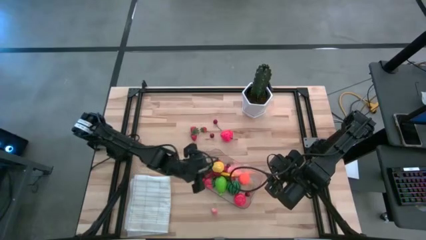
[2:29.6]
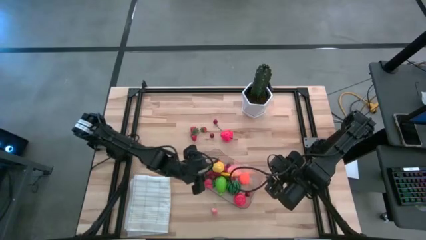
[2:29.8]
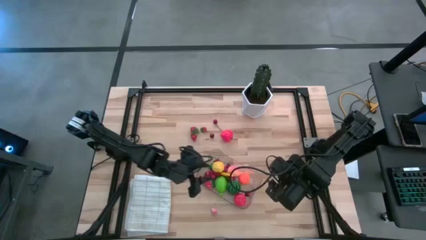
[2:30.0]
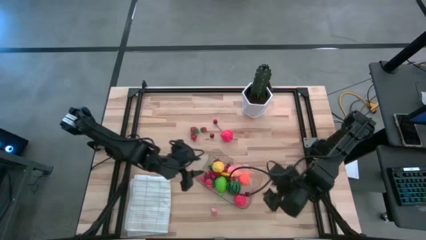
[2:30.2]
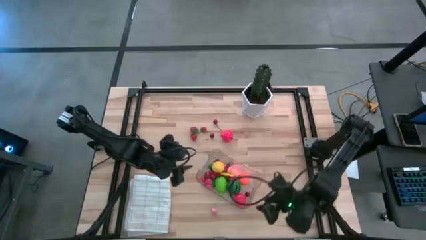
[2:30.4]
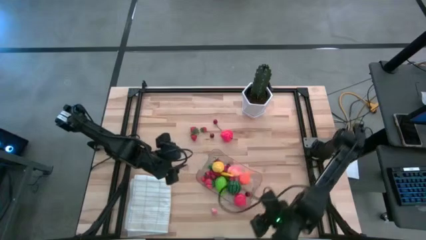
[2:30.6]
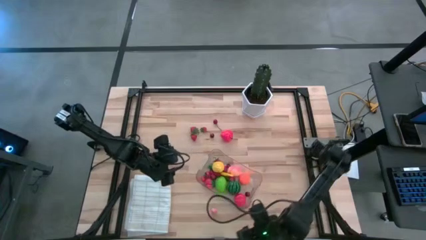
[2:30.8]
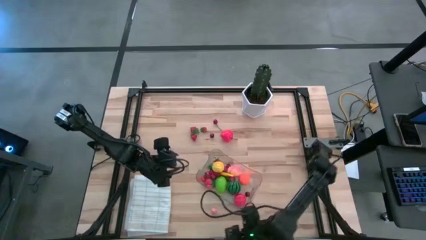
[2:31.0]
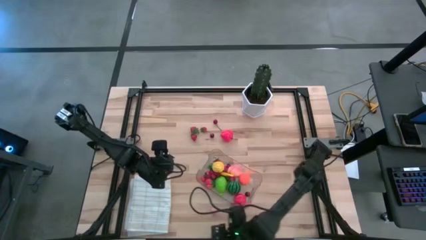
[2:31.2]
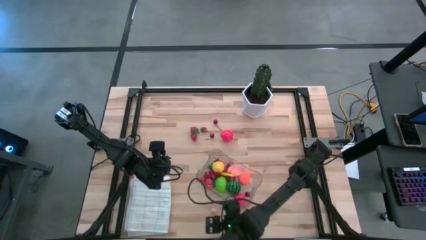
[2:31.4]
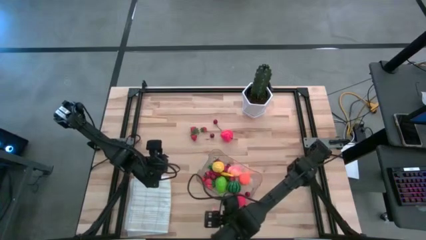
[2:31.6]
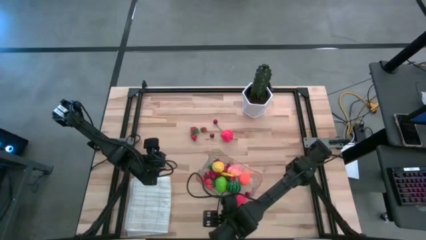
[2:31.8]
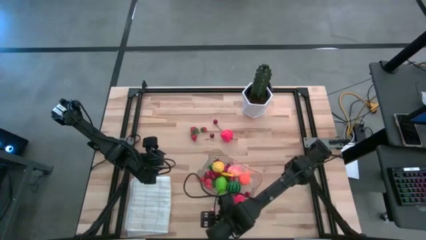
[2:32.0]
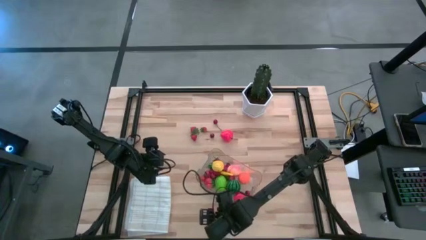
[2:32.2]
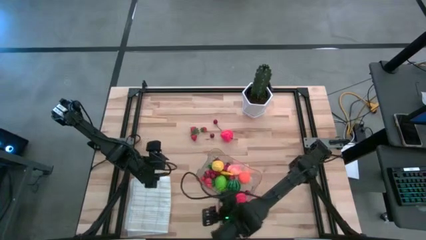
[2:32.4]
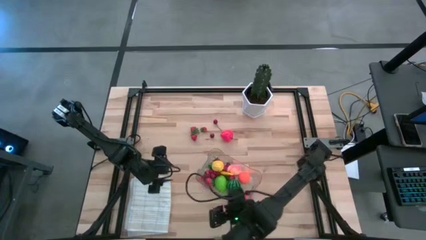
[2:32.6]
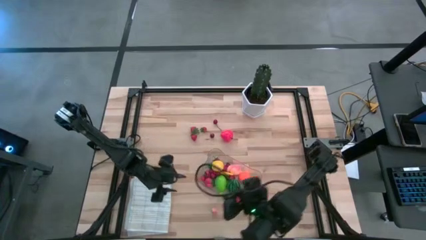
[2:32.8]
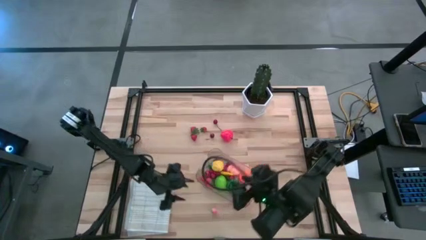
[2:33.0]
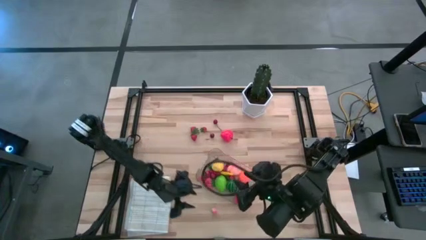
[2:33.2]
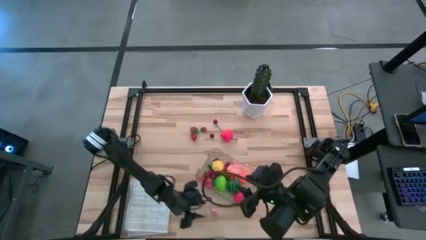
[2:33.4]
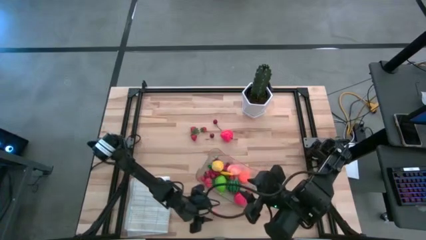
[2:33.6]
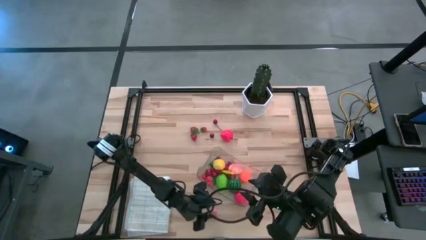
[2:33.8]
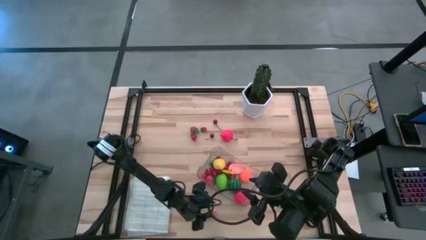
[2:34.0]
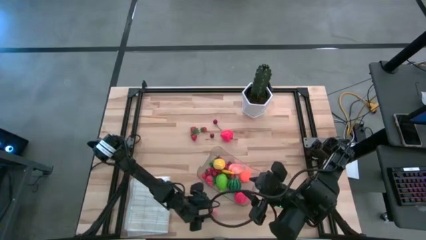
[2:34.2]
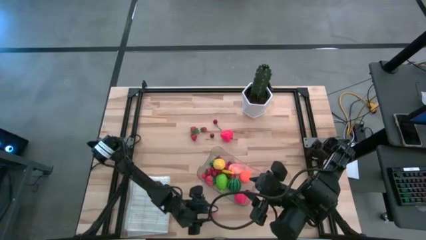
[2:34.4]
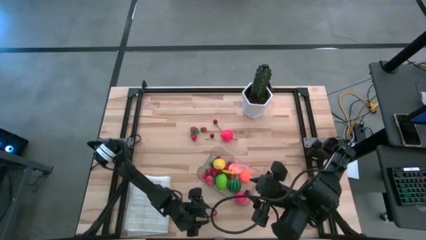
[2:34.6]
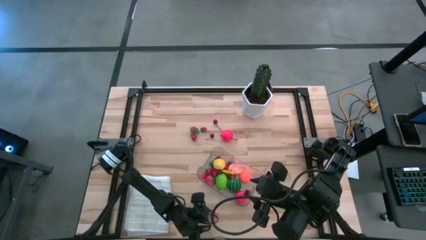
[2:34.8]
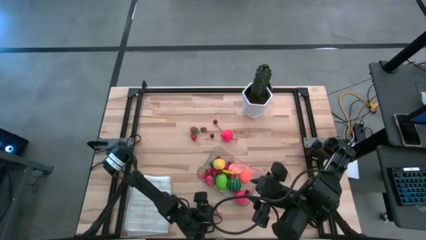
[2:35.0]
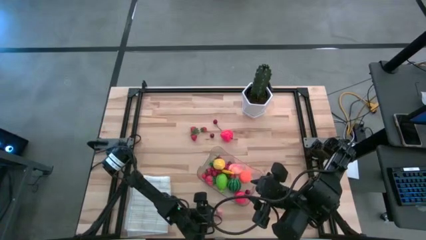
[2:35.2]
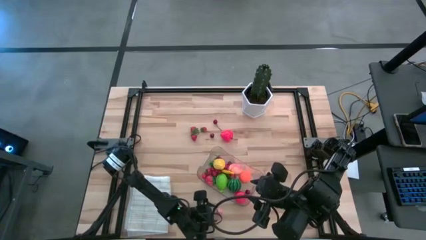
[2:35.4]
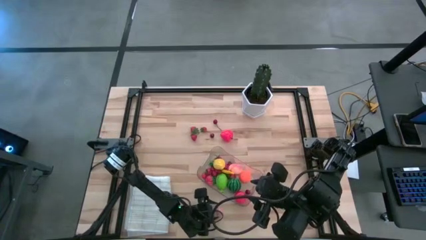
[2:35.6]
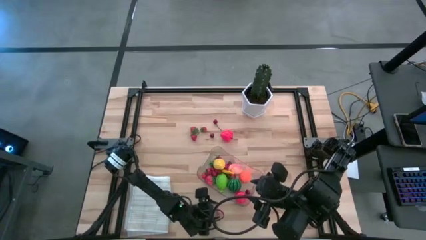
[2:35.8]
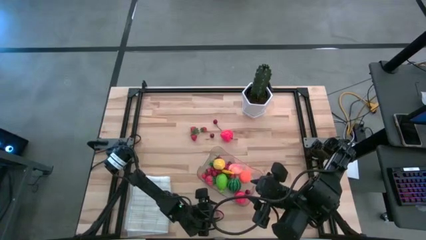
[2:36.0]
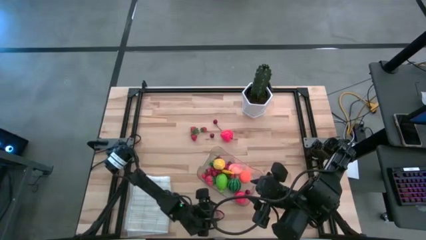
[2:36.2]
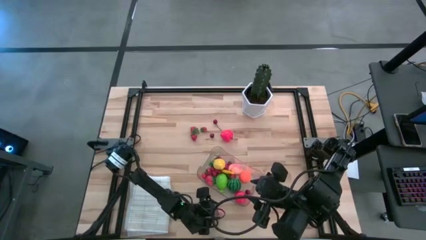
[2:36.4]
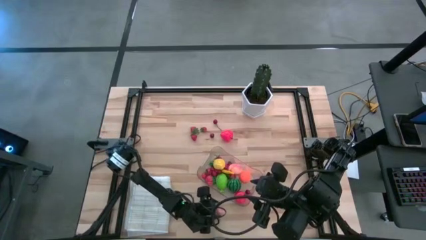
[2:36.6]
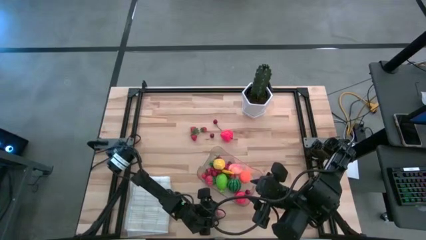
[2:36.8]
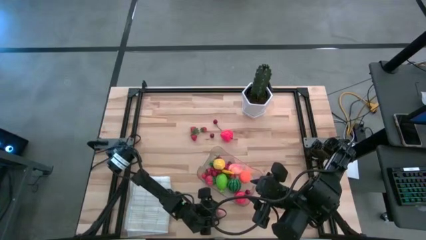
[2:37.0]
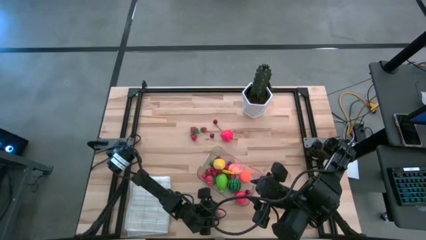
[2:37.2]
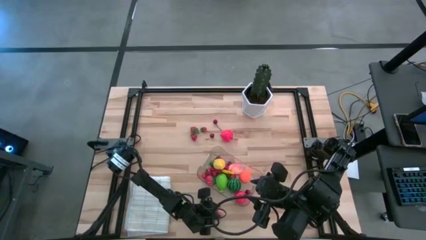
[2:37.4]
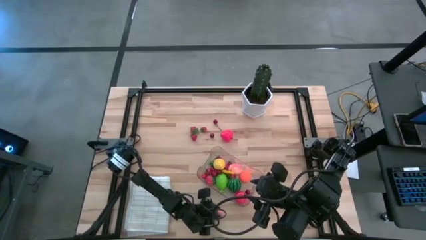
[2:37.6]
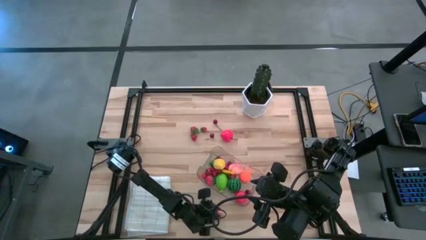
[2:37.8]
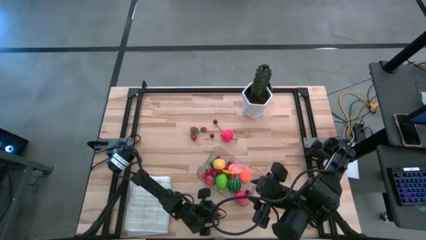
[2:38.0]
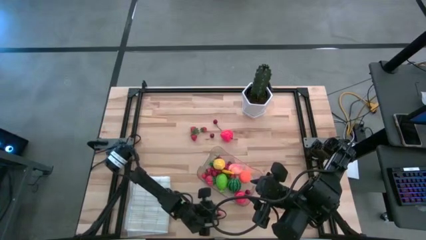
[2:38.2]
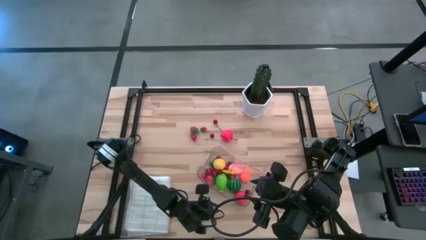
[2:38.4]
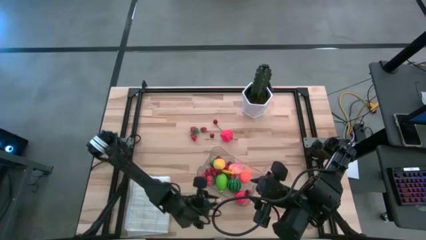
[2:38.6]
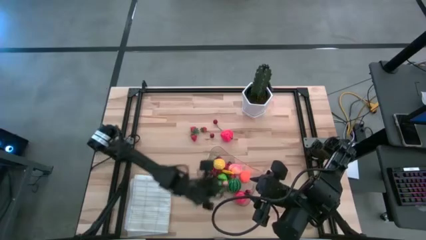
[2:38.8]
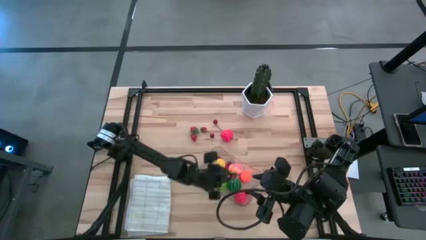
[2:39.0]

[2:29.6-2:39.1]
Task: Pick and placing Produce into tupperware
Put the pink peach into the transparent bin

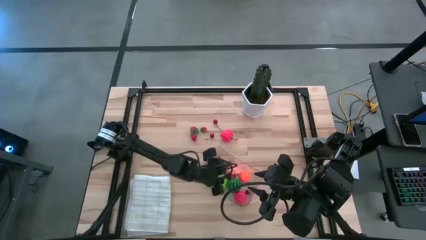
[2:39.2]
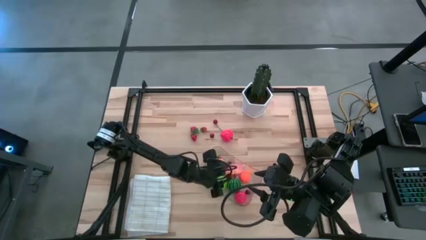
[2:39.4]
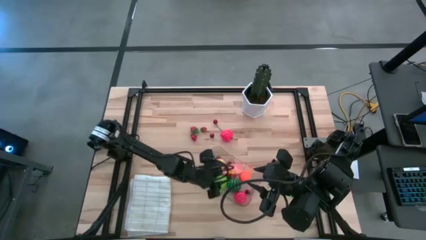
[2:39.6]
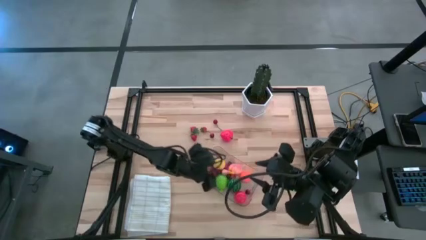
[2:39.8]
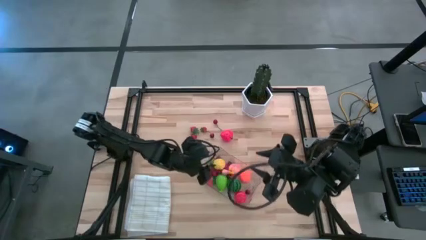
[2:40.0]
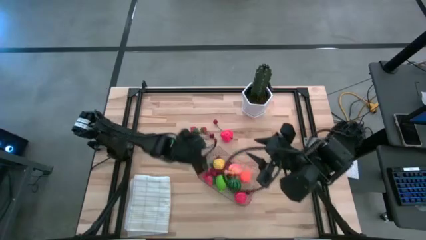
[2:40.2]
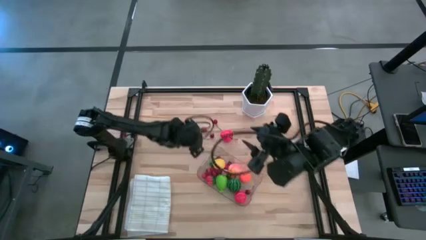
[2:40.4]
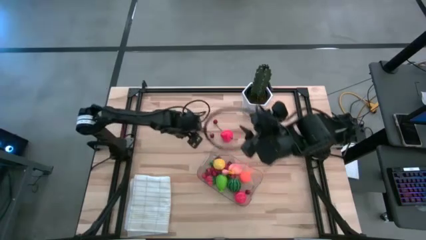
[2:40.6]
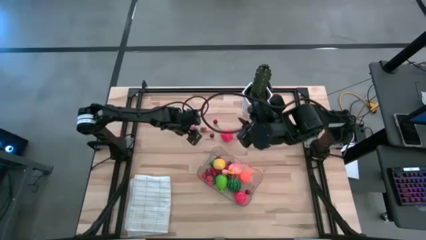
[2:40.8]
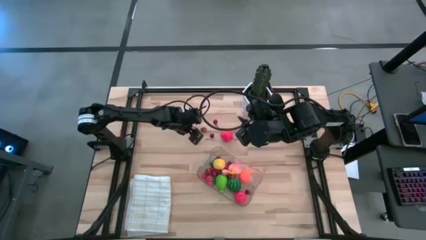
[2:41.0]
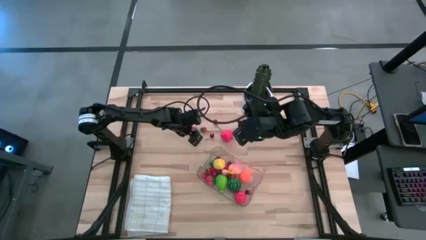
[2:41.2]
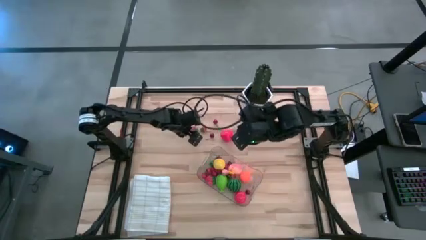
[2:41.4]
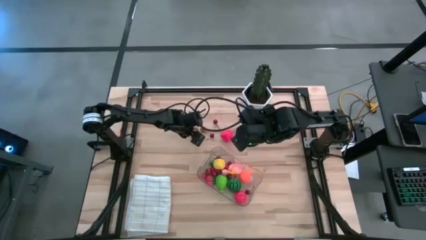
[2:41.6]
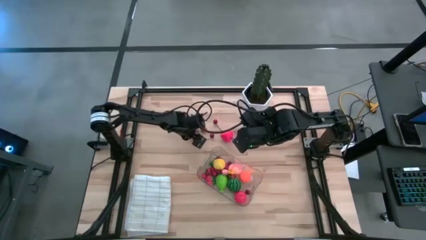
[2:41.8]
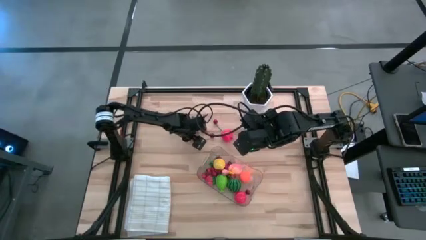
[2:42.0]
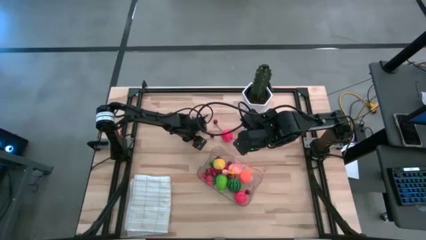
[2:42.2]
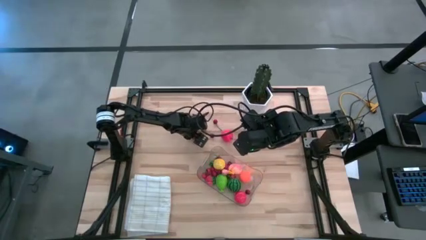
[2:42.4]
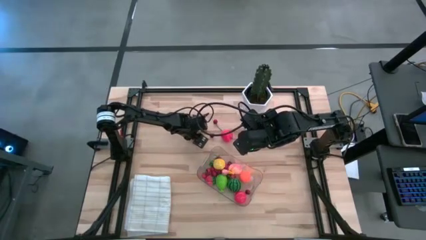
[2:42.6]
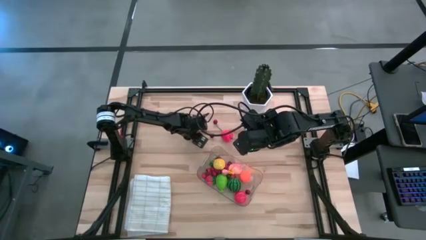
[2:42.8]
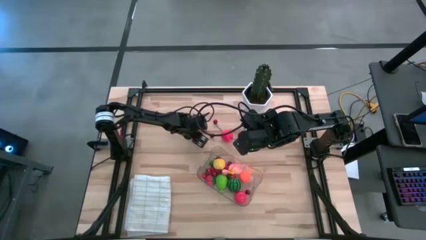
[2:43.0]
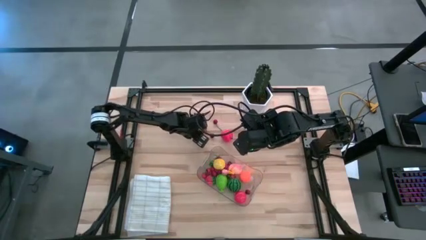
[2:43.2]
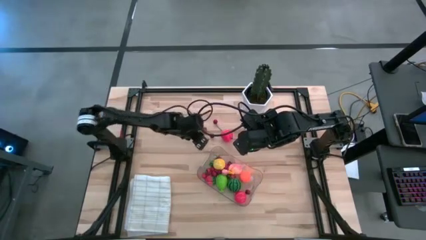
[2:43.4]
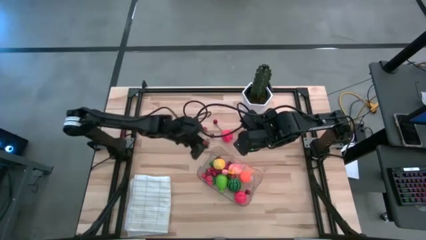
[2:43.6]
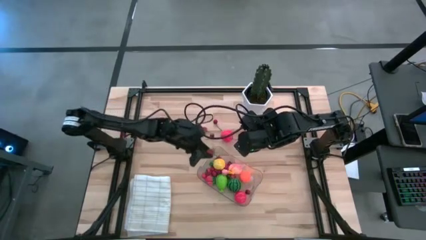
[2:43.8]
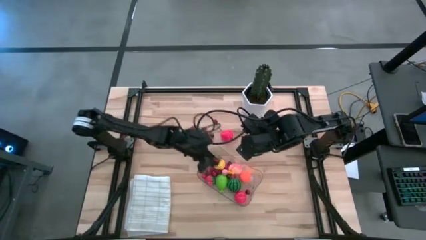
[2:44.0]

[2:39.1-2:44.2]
Put the red strawberry into the transparent bin
